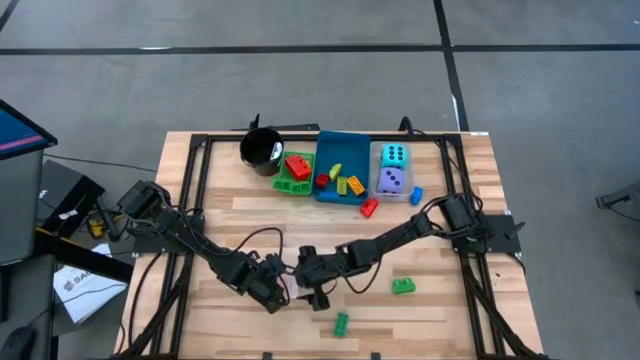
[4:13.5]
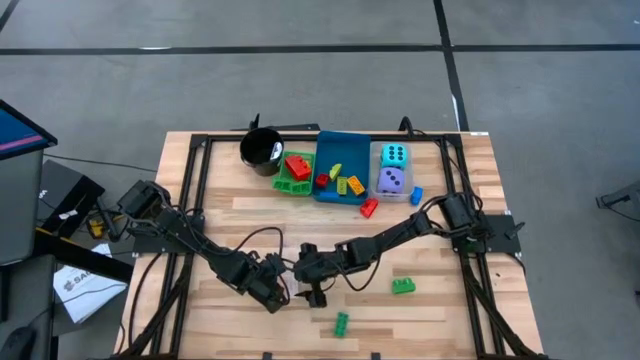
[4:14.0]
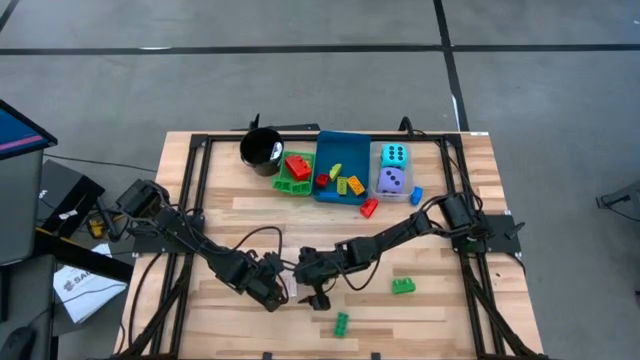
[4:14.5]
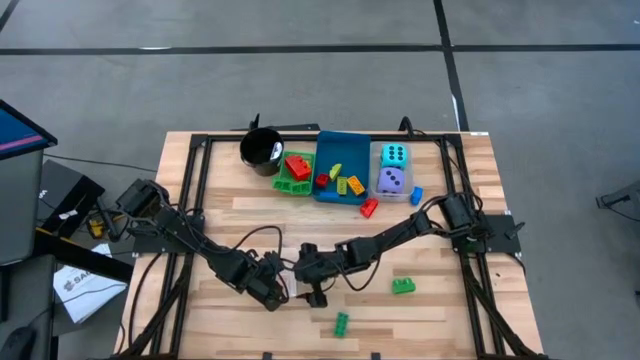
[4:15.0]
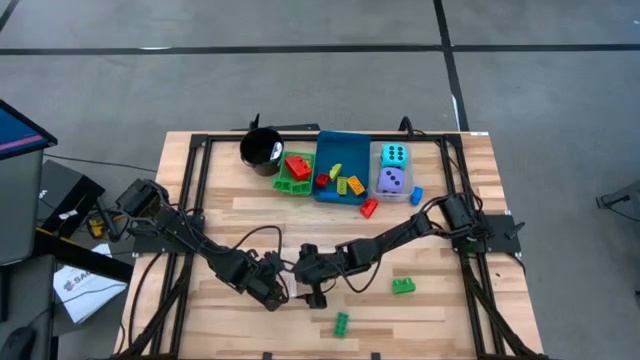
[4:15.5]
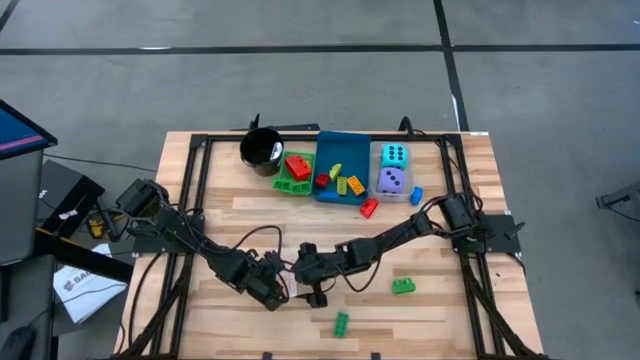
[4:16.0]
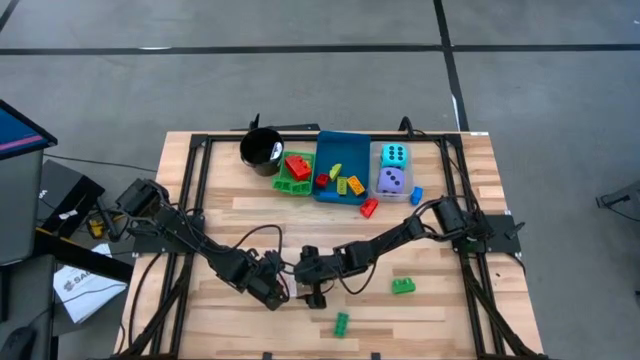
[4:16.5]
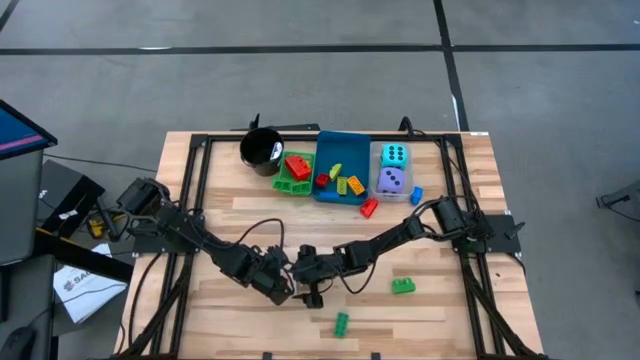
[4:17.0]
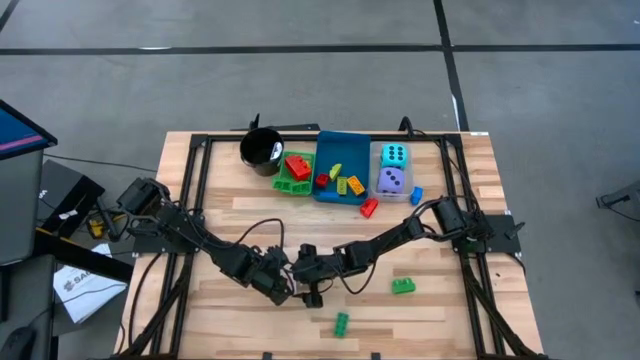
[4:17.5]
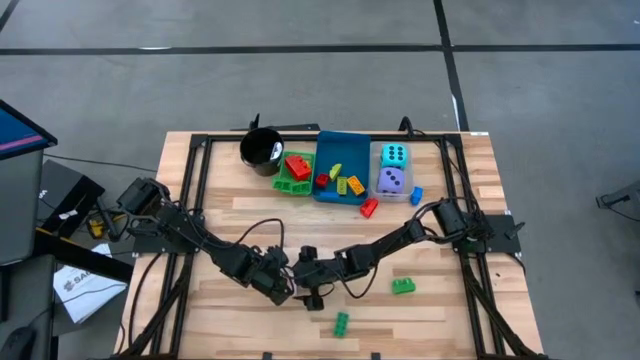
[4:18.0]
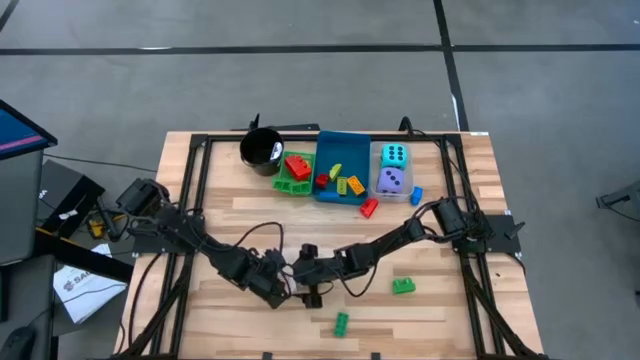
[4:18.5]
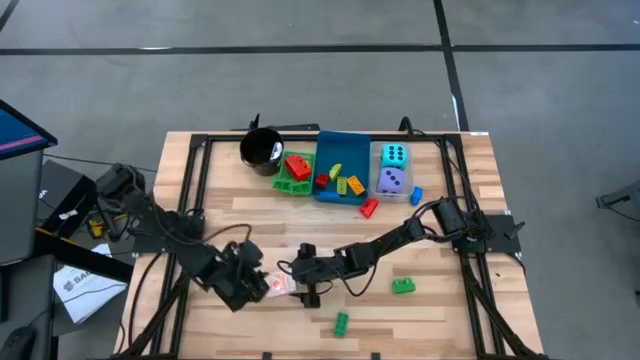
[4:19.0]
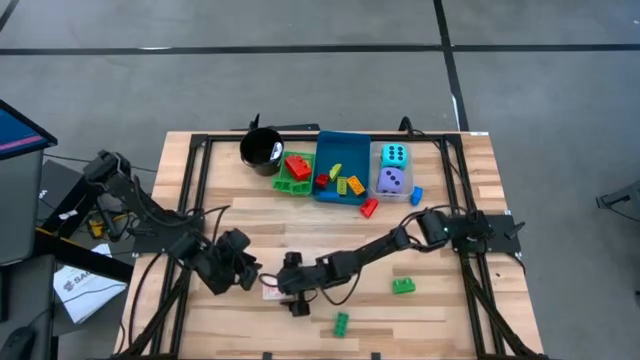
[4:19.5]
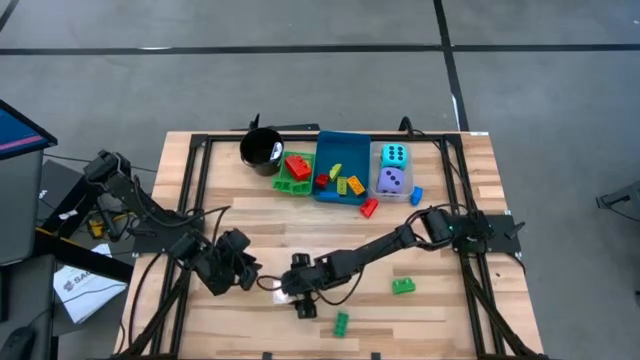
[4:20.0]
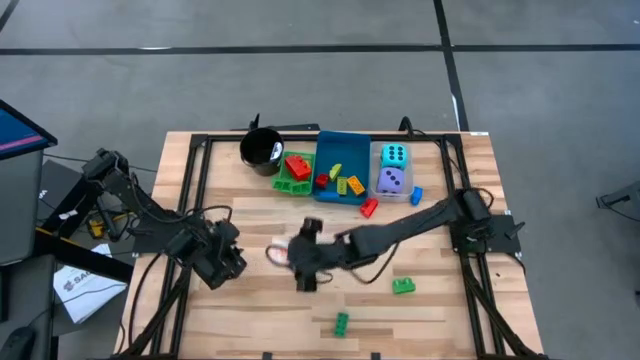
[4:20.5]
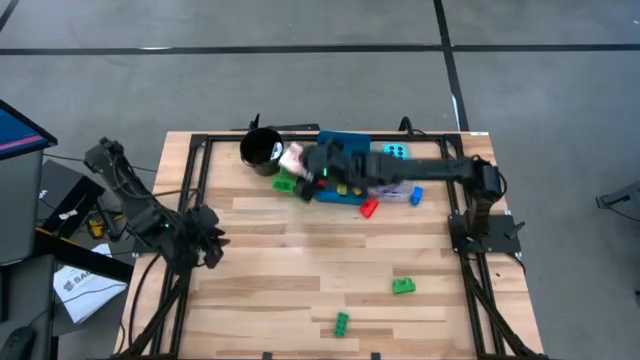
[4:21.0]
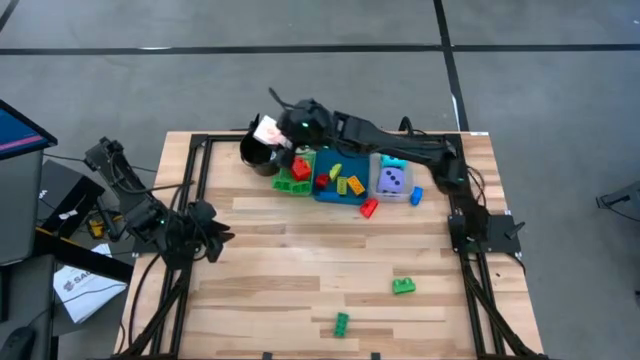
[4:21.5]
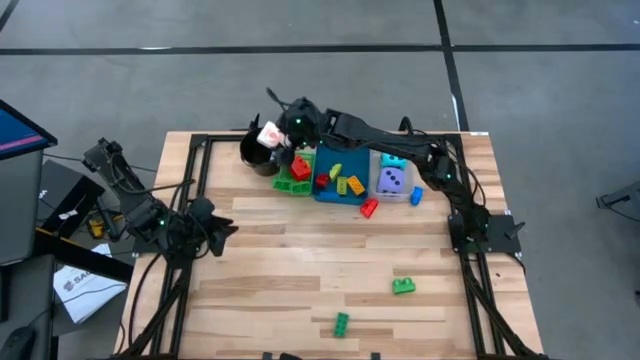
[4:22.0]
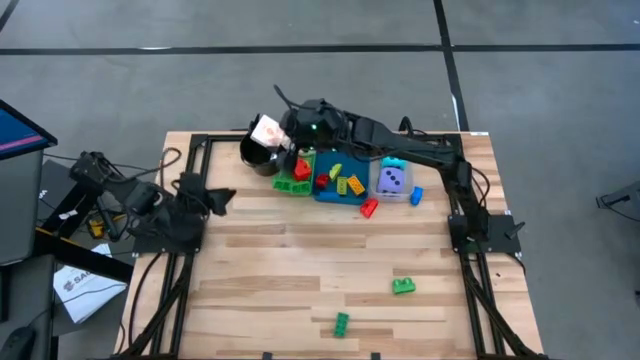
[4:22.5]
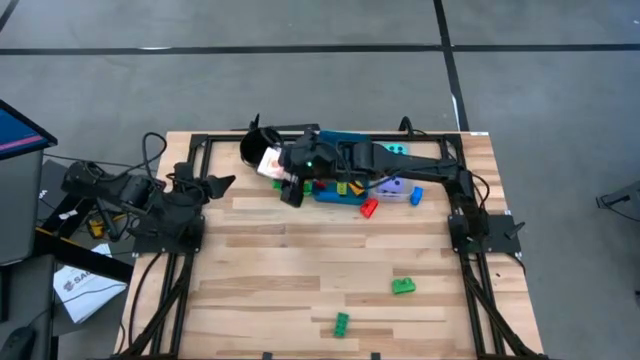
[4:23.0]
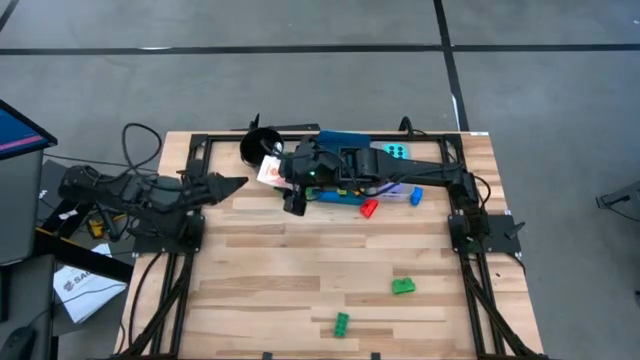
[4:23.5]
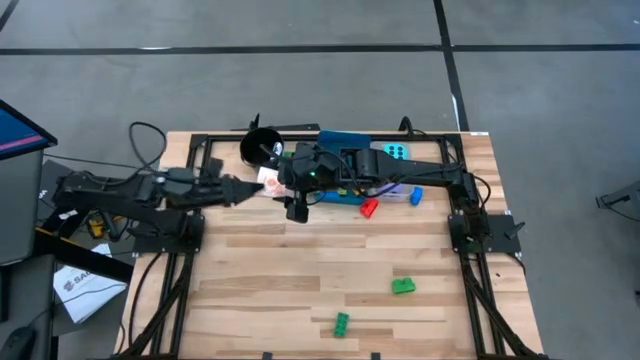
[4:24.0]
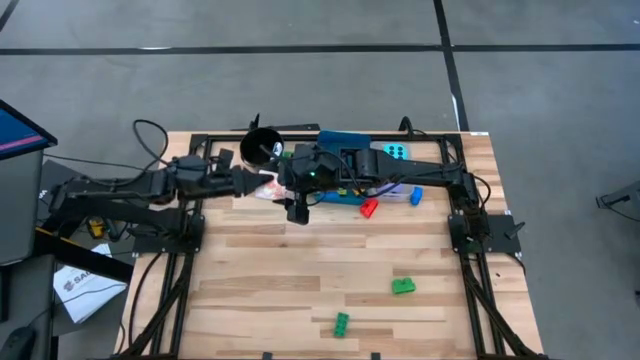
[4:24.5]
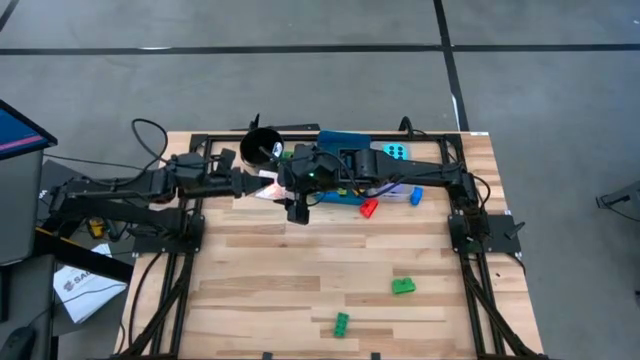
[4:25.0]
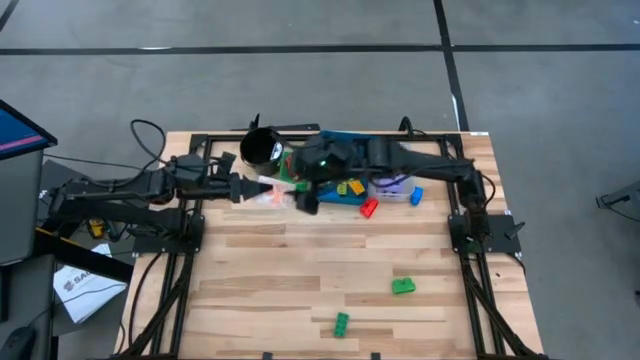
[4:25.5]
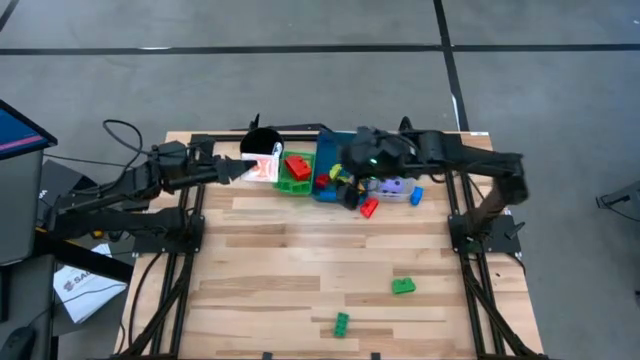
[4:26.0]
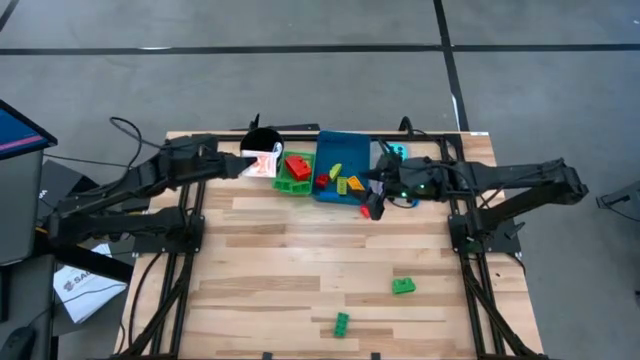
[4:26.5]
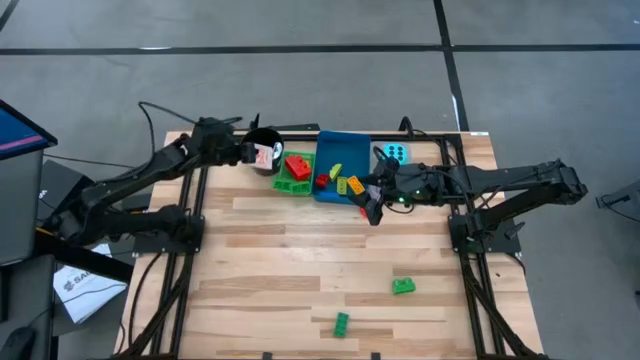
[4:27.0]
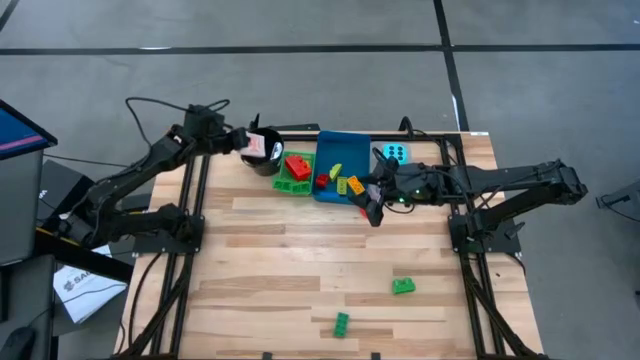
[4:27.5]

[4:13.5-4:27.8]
Task: Pick & Place Toys
Put the orange deck of cards into the black bucket
